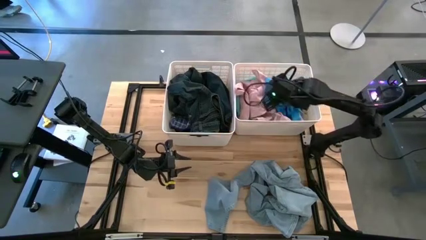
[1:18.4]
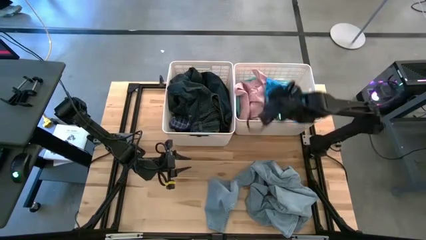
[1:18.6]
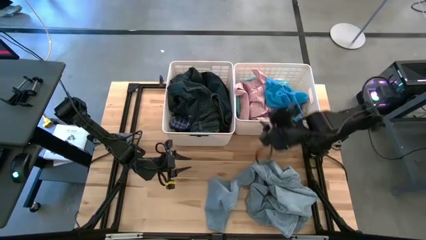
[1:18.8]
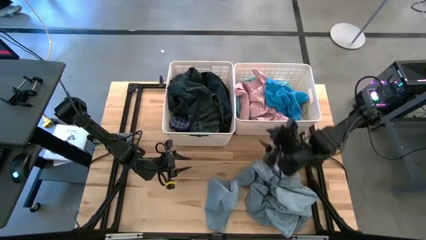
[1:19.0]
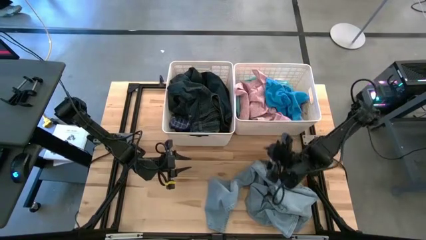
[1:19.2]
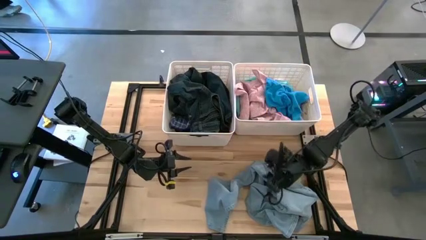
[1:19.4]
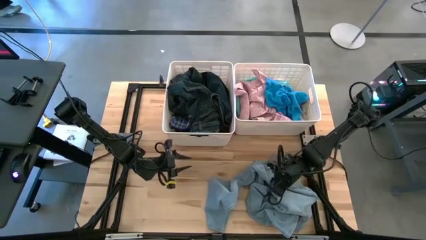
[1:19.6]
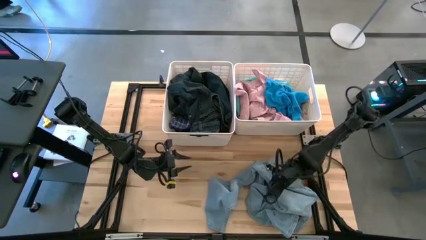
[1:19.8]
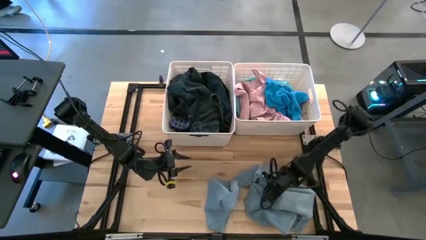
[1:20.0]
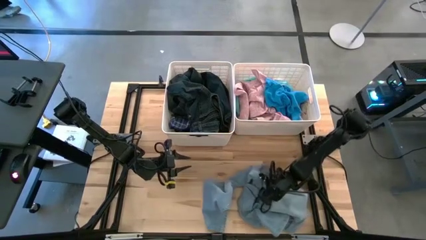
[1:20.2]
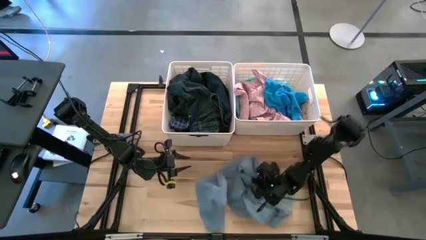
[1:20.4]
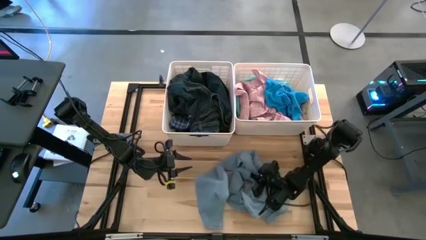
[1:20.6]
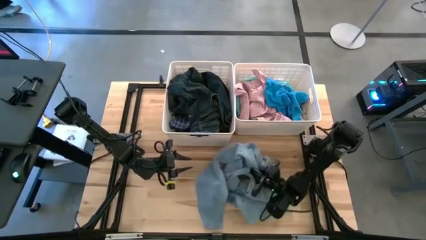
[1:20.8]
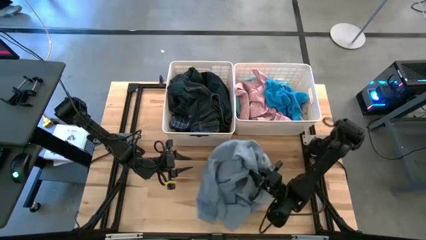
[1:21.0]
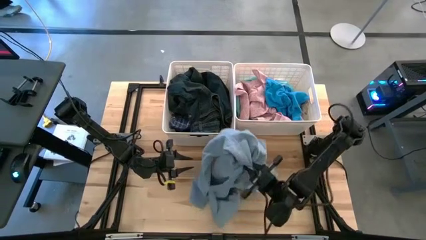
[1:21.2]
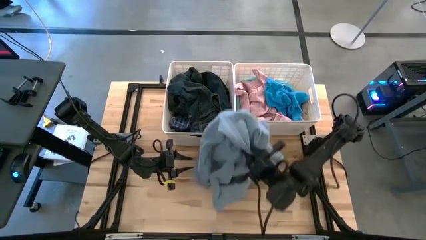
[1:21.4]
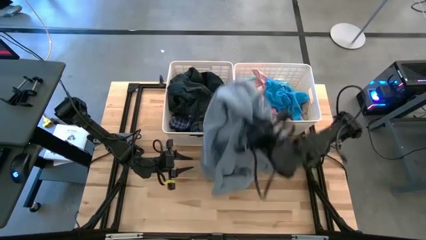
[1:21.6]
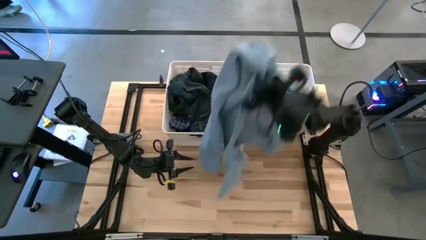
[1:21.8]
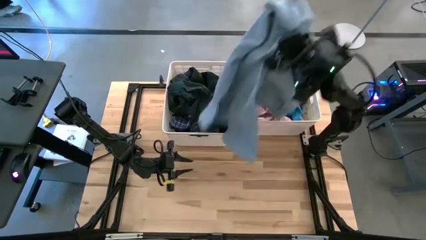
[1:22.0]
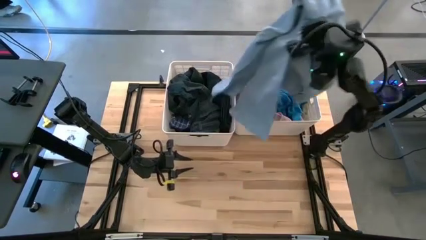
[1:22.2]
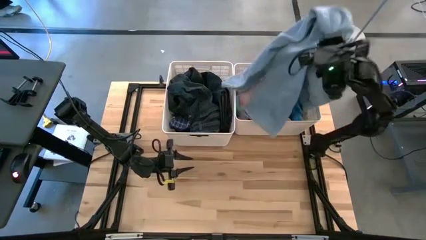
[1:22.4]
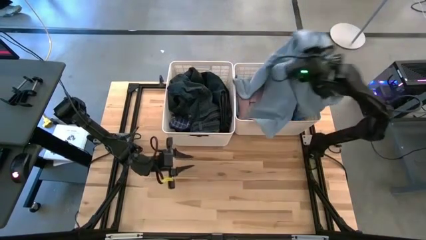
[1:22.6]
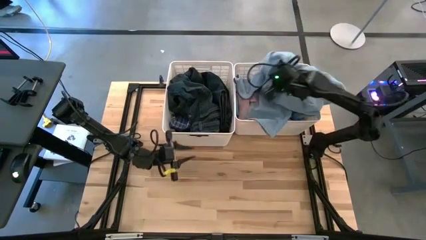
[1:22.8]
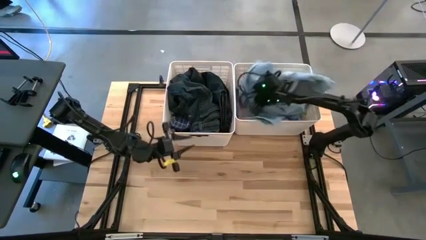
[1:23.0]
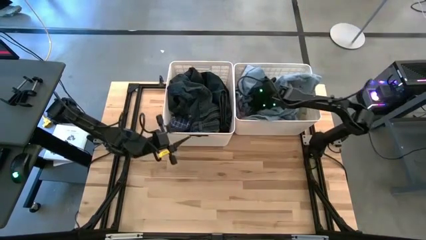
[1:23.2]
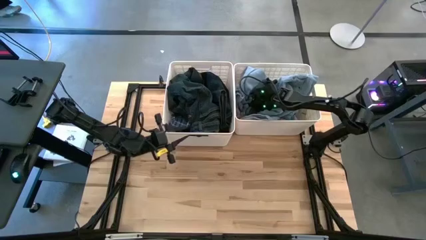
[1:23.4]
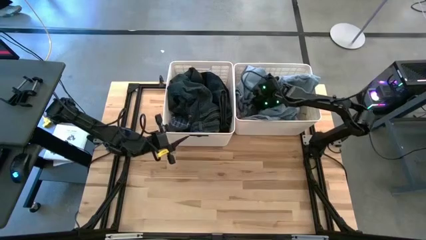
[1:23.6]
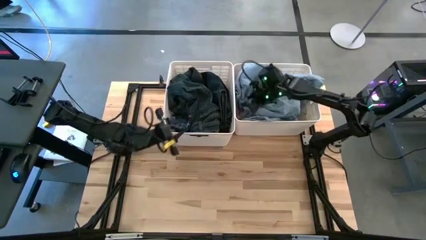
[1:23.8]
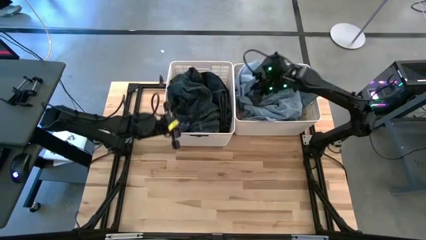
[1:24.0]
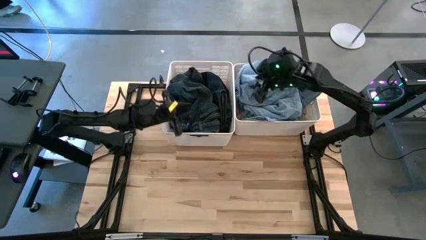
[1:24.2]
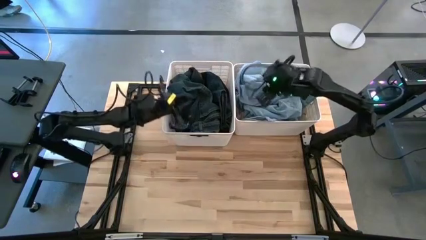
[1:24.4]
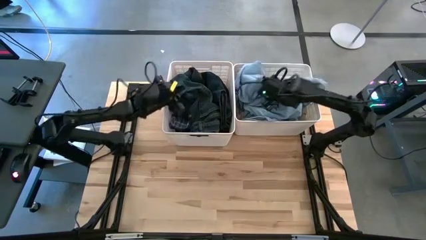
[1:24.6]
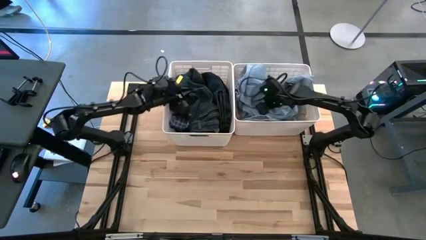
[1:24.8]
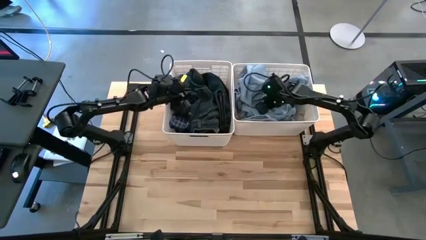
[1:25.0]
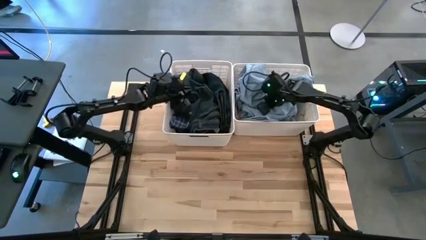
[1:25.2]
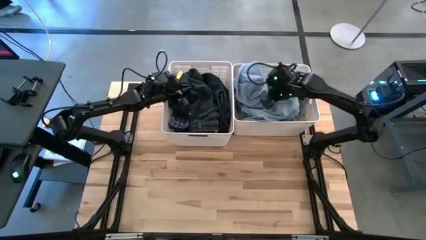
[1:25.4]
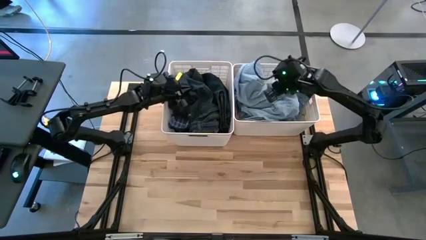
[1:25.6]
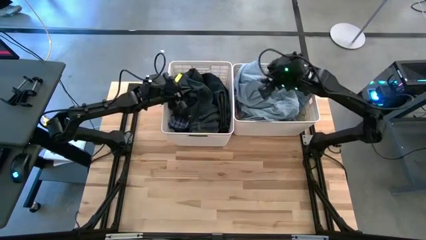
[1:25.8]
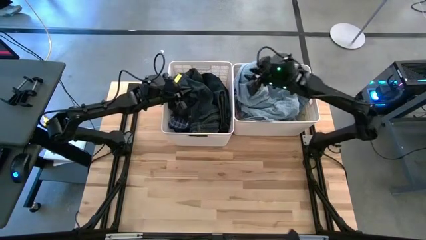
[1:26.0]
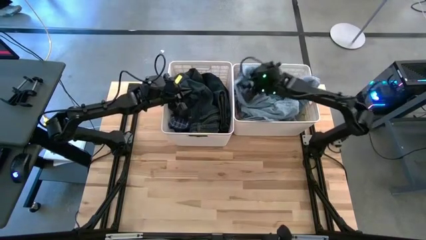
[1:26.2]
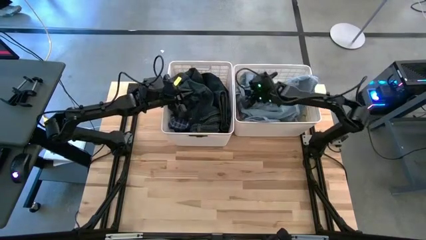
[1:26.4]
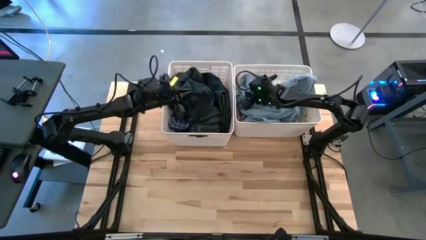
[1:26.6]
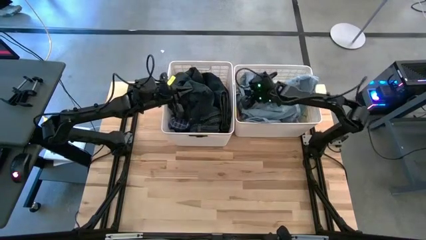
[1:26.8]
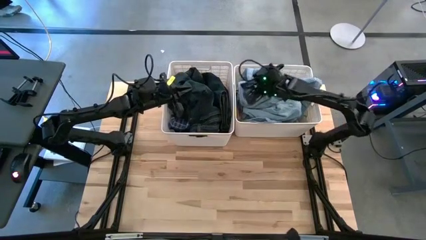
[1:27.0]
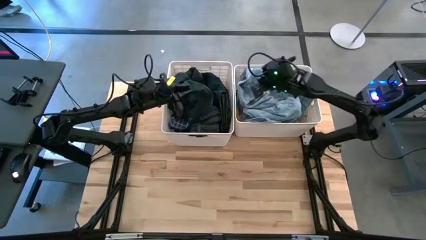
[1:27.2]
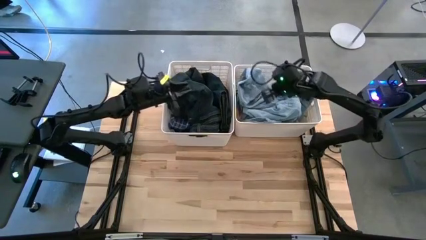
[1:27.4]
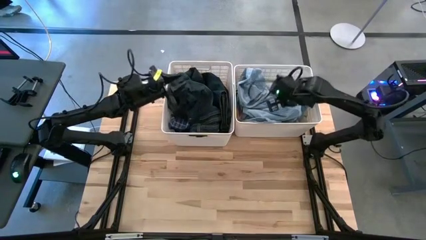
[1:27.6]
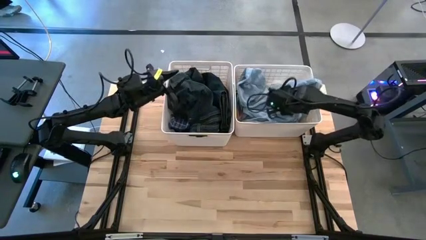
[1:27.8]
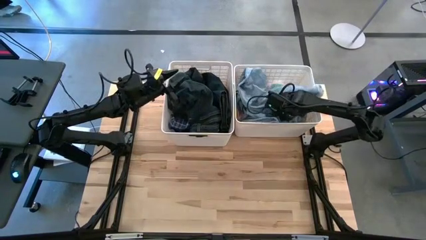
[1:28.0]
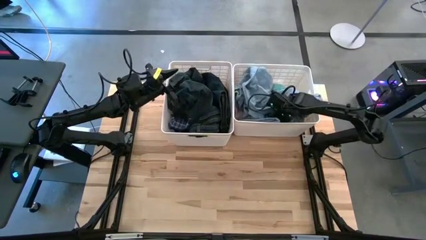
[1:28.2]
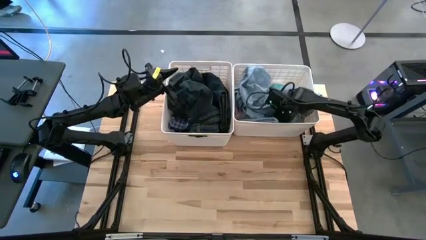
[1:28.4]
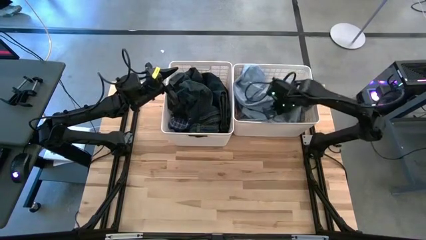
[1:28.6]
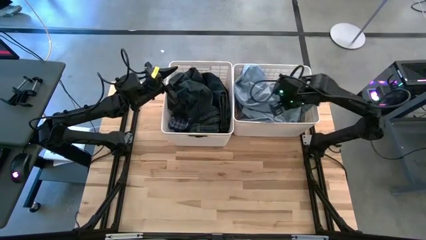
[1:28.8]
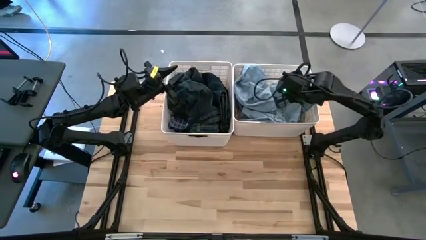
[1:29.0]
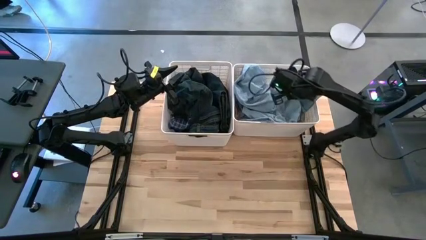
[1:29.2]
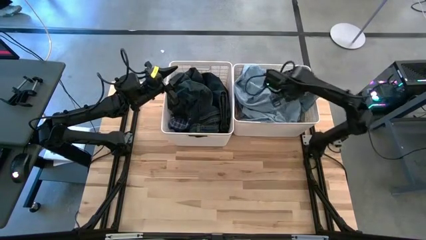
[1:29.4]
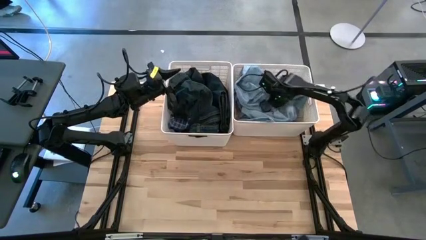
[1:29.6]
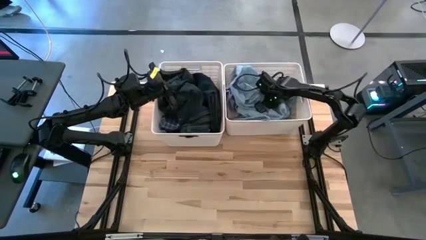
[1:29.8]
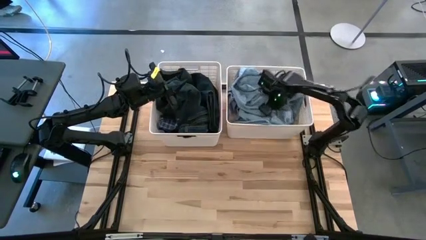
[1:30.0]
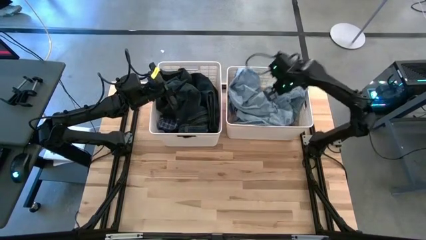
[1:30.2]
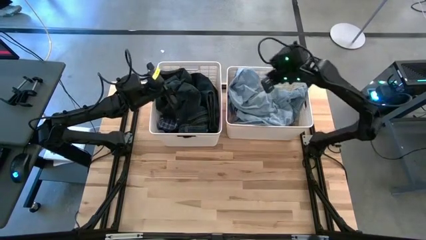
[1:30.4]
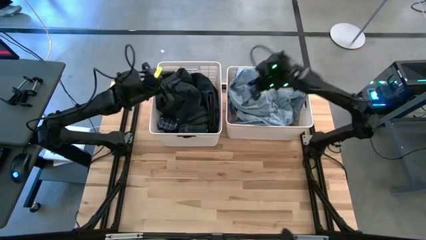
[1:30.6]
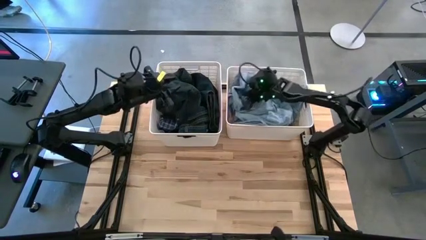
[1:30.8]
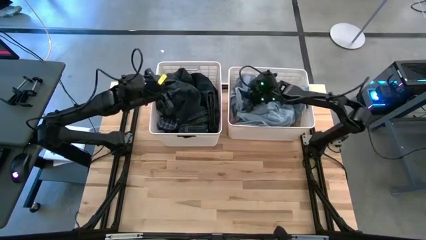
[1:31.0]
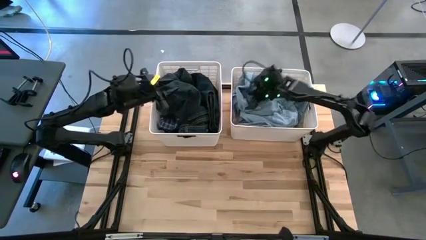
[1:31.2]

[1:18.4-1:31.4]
Task: Sort clothes
Put the light blue pants into the right white bin
